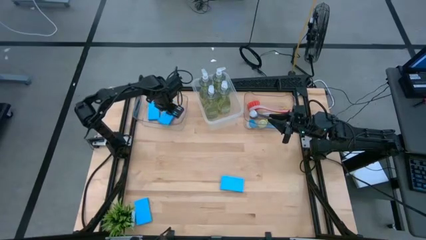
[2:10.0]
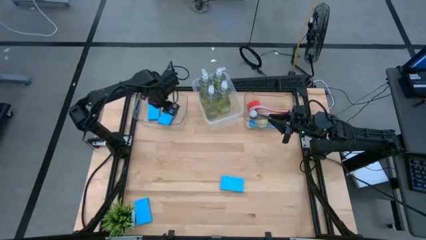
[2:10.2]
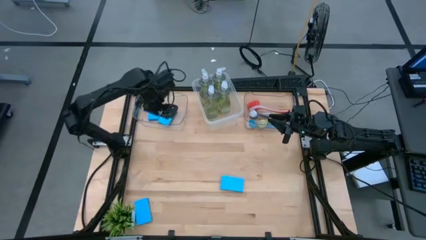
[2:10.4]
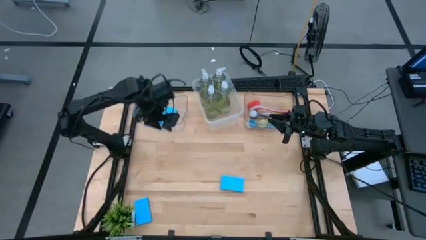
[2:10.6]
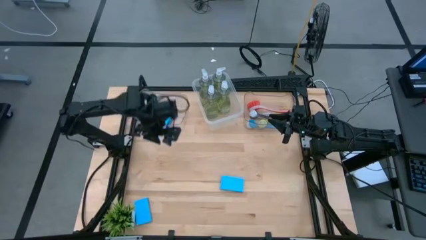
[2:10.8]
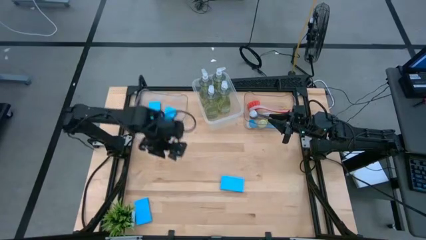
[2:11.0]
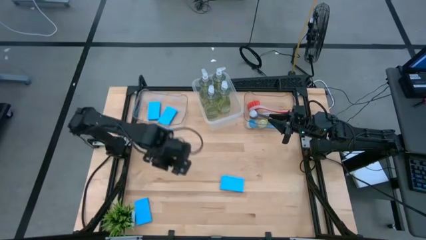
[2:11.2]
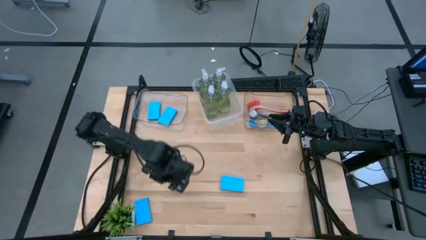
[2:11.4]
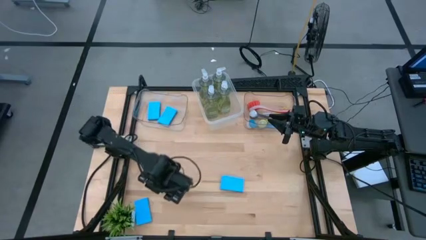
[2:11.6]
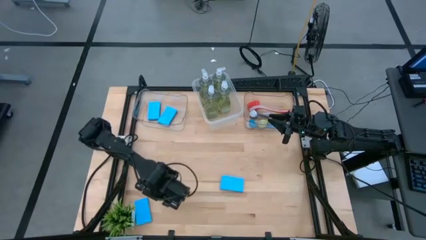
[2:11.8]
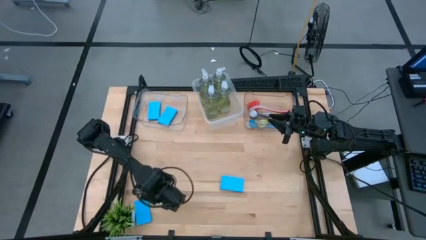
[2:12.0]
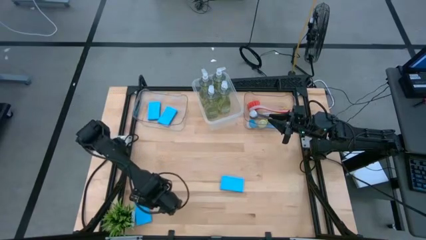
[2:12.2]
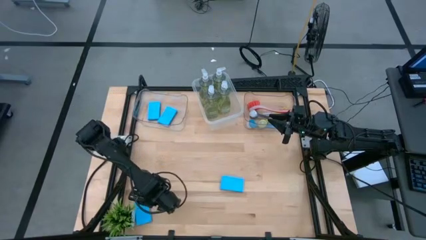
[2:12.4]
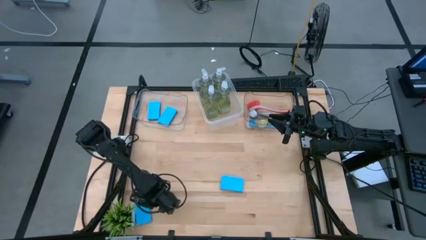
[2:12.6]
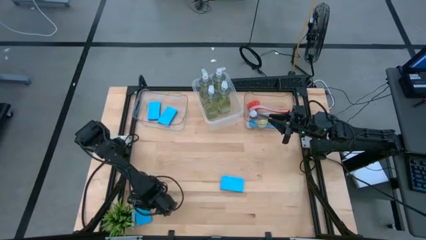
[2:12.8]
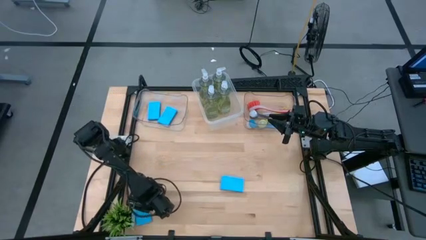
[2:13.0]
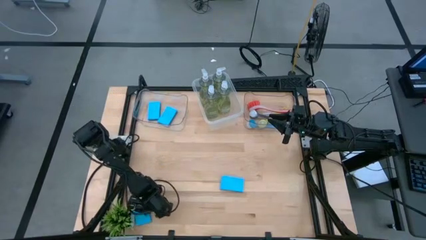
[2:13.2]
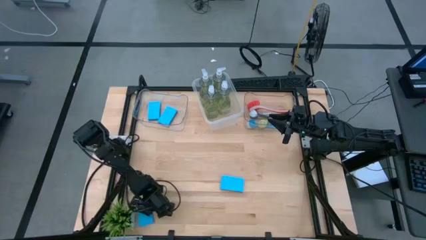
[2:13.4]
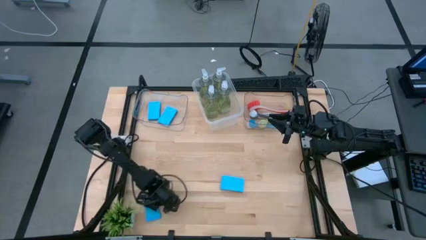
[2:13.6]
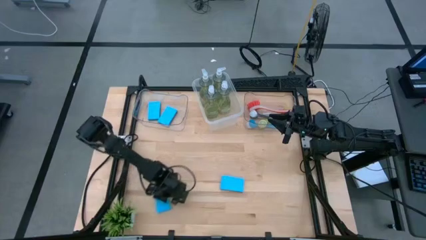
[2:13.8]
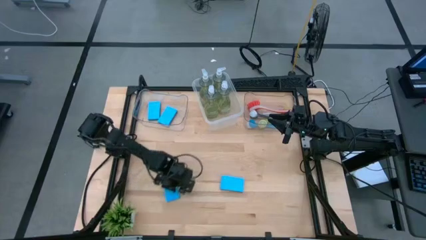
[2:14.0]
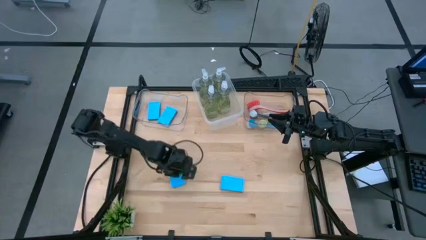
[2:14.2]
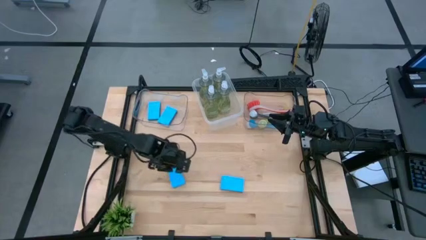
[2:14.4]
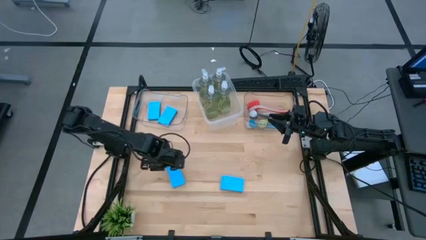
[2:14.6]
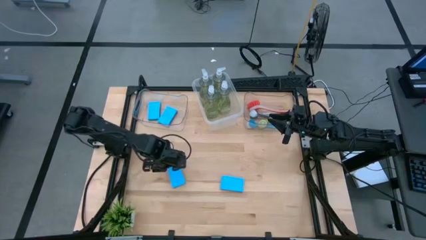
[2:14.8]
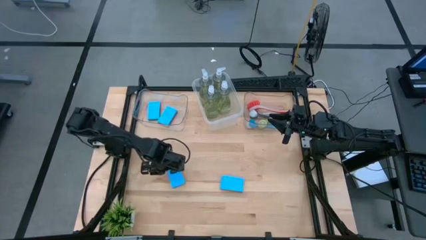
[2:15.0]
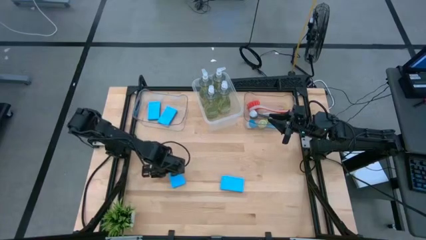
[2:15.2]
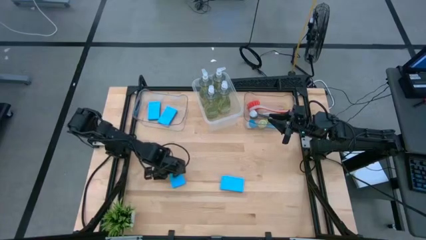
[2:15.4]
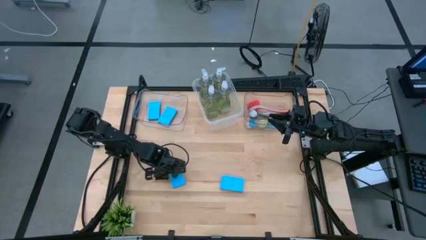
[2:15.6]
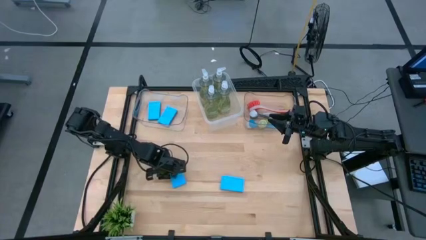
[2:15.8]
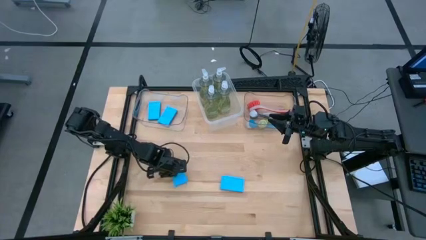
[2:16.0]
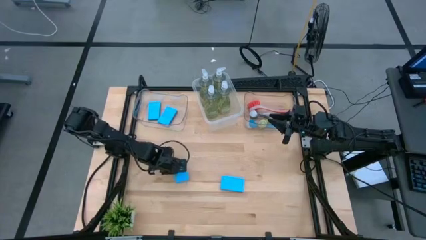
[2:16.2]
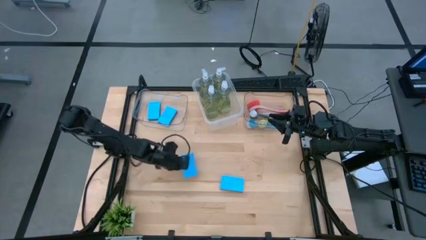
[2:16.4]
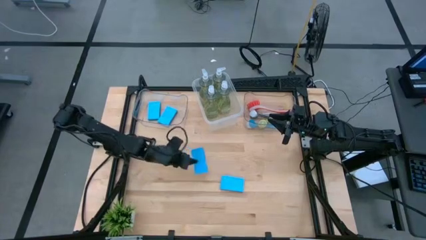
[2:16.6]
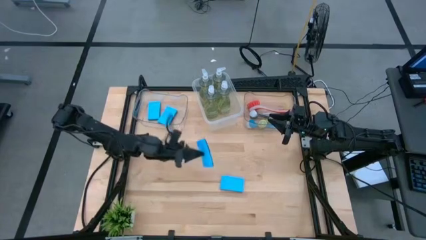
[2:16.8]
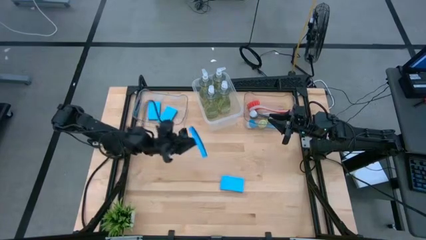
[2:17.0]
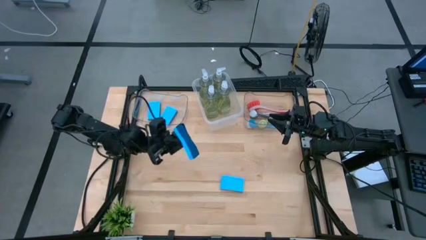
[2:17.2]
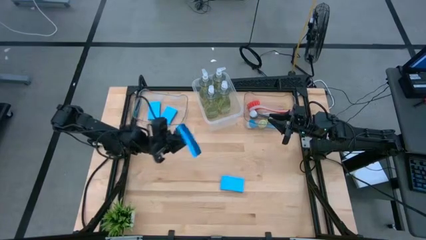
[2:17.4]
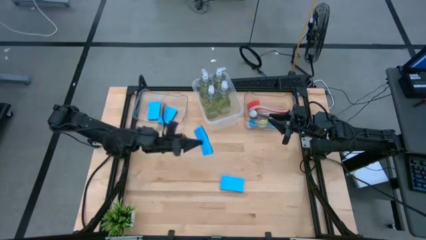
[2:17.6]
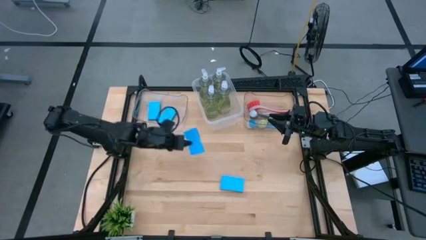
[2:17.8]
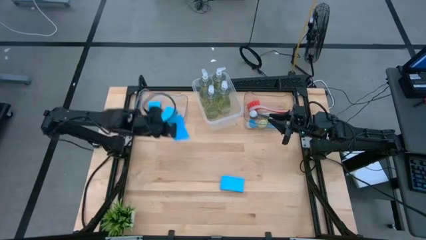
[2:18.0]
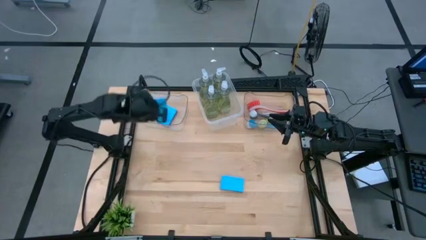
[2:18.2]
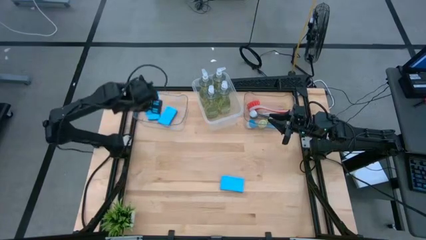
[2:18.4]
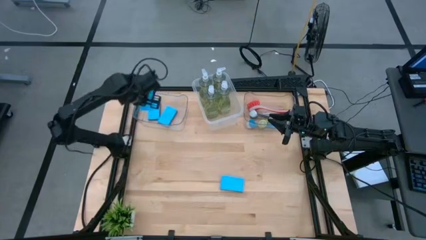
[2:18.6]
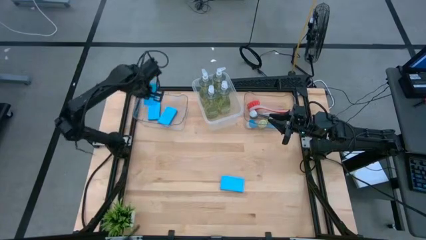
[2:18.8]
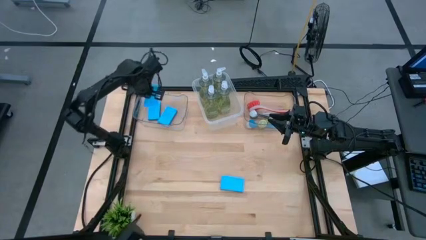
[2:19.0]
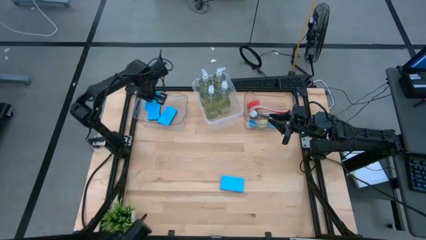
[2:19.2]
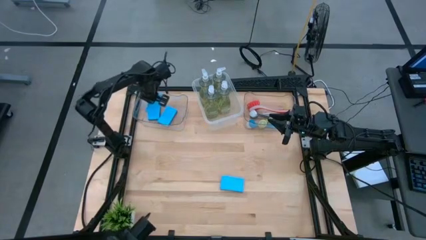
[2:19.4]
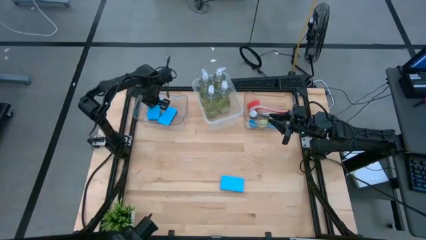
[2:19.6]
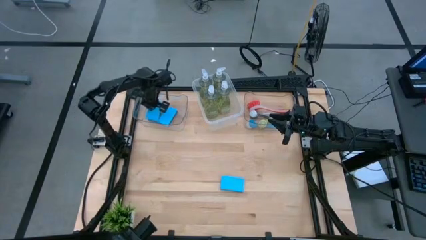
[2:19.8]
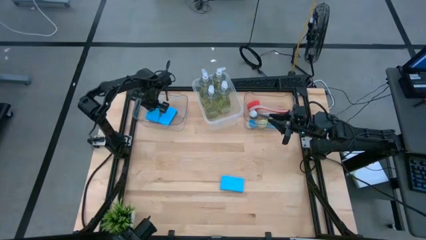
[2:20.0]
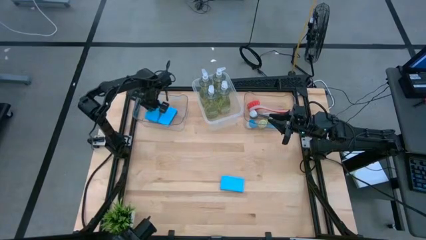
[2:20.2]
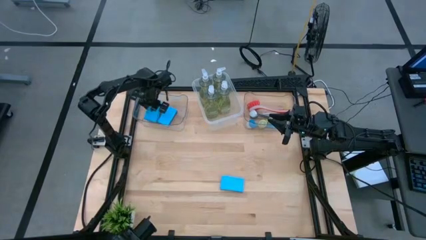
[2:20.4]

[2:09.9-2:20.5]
Task: Pick & Place Kitchen Sink Supplies
Put the blue sponge into the left transparent bin
